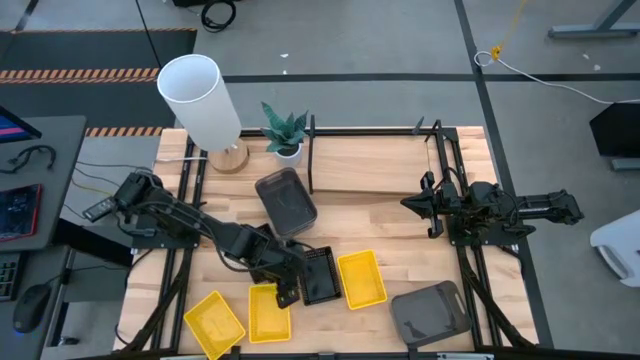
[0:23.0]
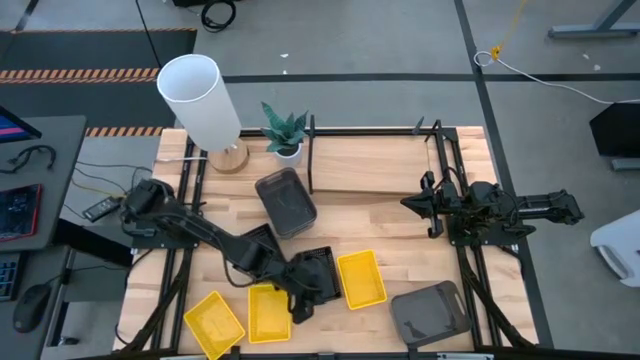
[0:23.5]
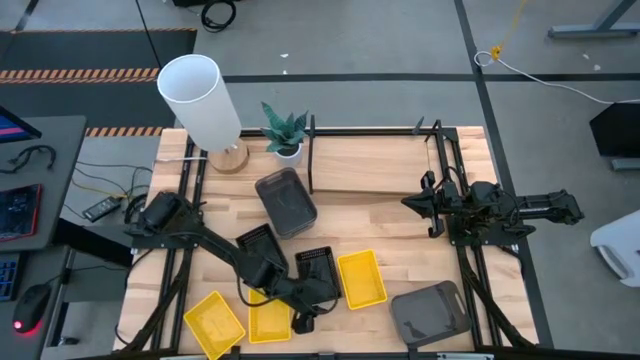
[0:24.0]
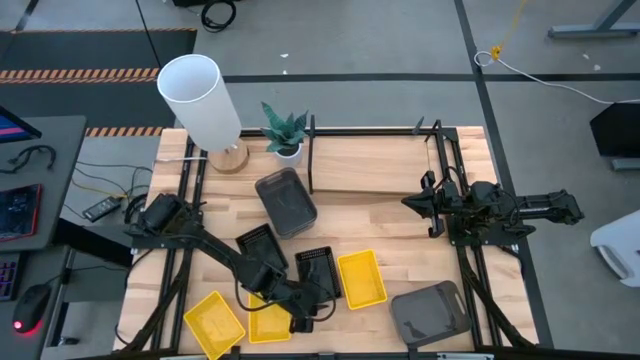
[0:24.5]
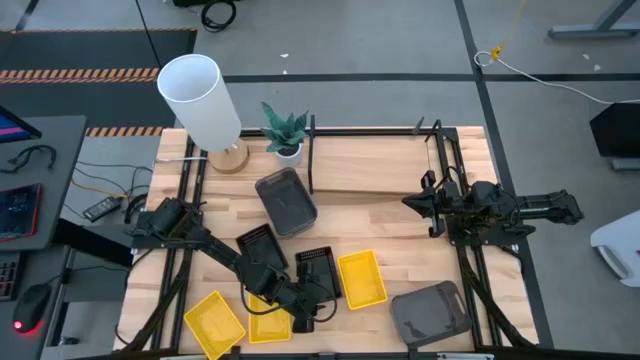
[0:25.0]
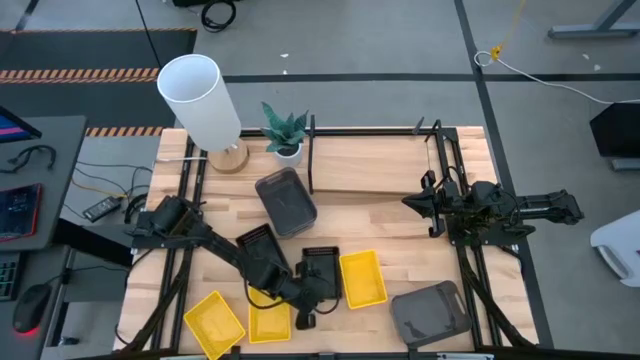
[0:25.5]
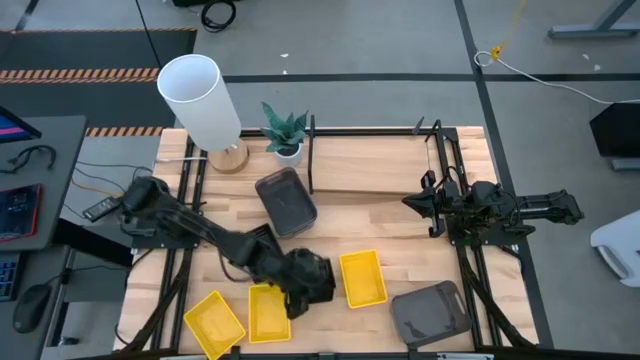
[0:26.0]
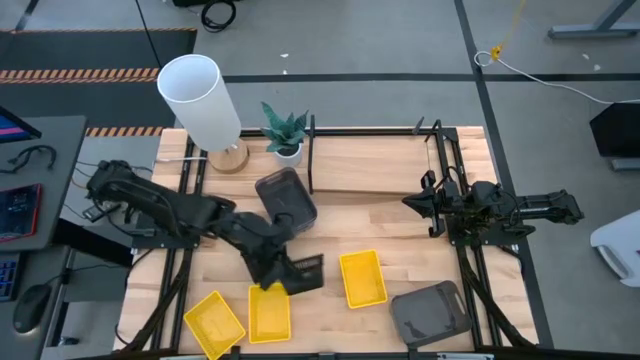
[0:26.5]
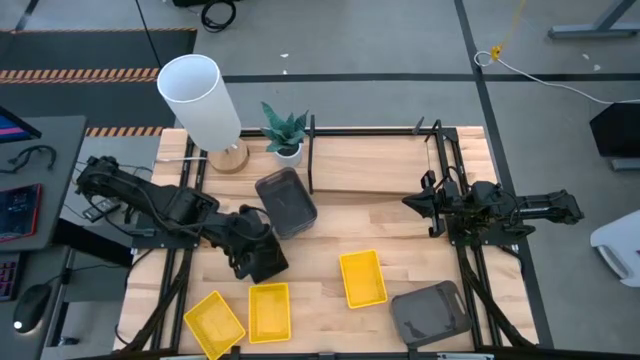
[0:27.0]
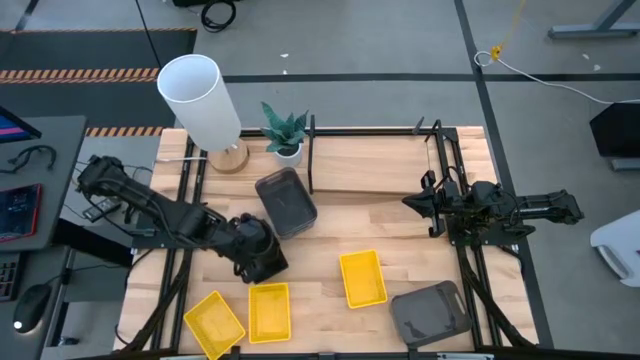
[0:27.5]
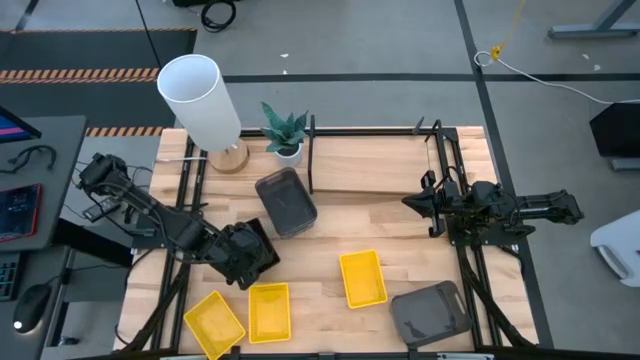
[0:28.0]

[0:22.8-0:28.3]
Task: Stack baskets on shelf by color
Stack the right black bin into the left black bin

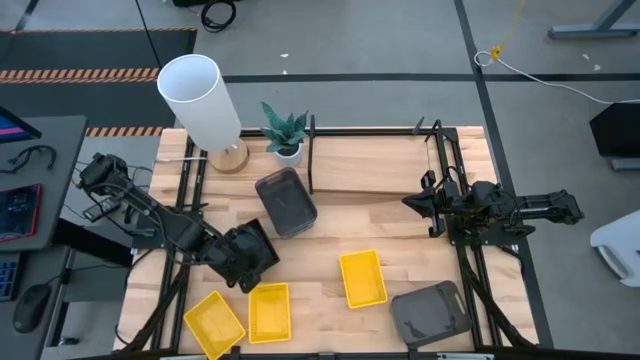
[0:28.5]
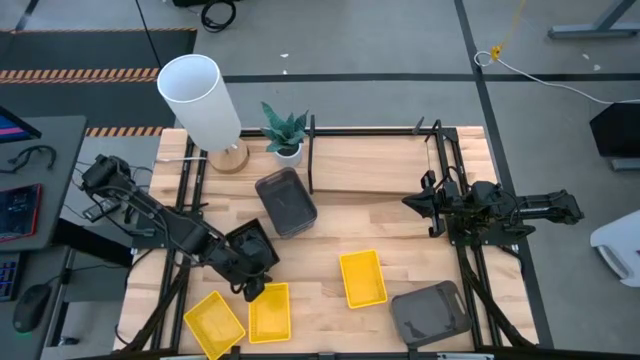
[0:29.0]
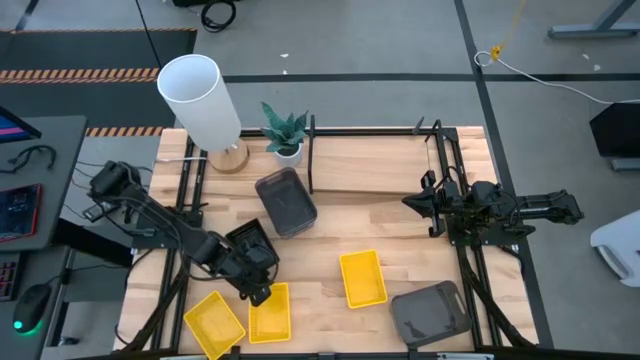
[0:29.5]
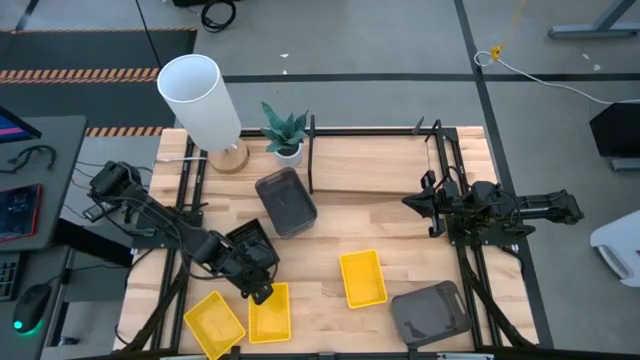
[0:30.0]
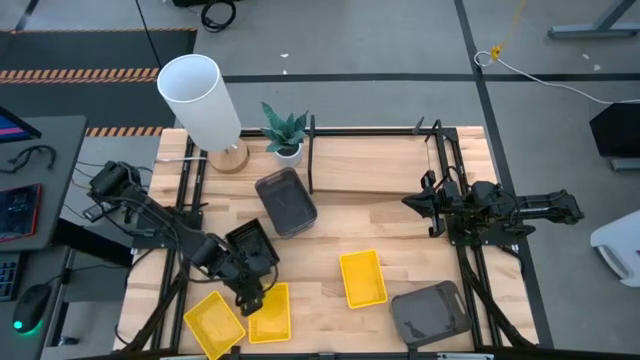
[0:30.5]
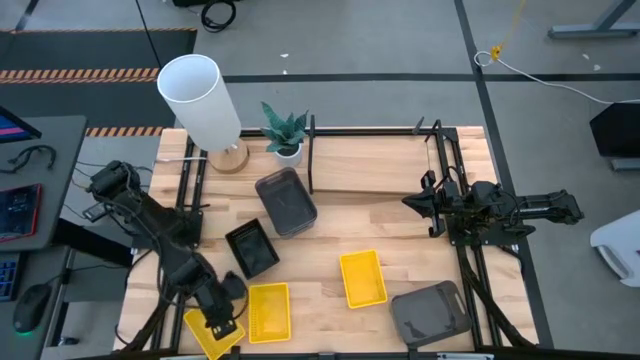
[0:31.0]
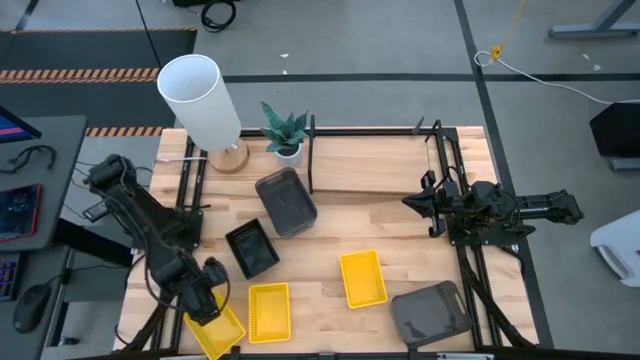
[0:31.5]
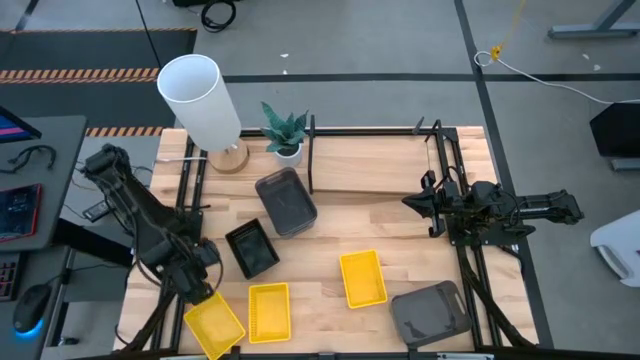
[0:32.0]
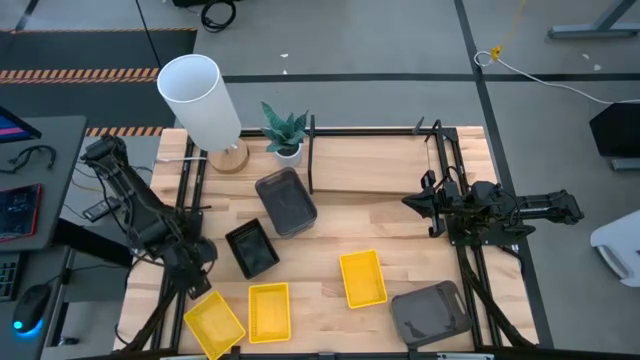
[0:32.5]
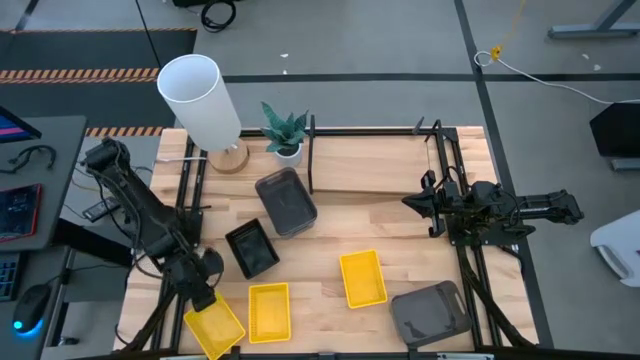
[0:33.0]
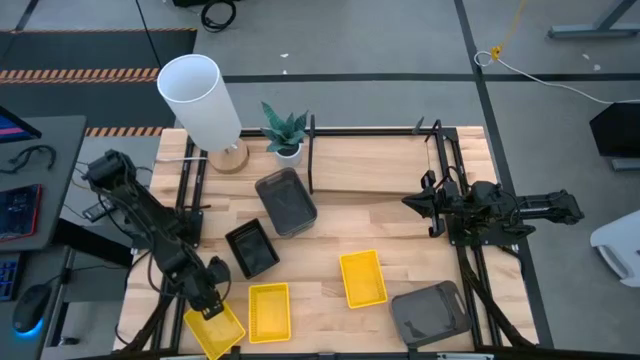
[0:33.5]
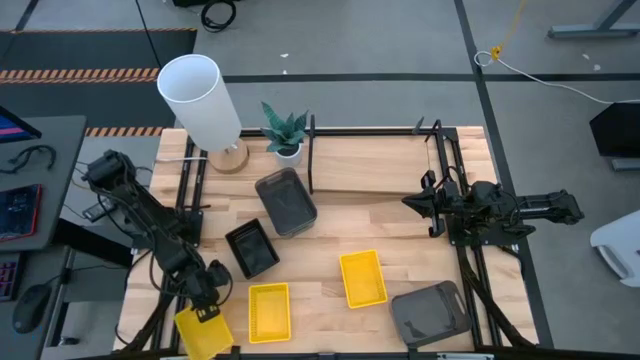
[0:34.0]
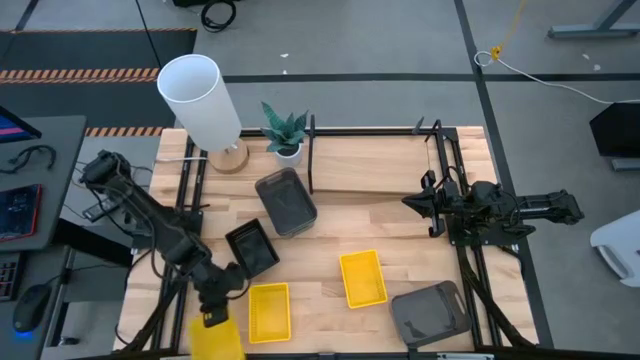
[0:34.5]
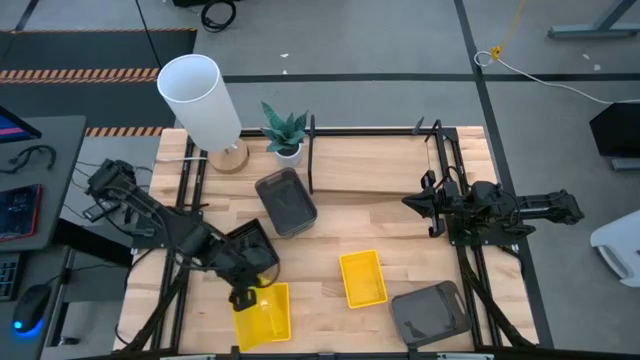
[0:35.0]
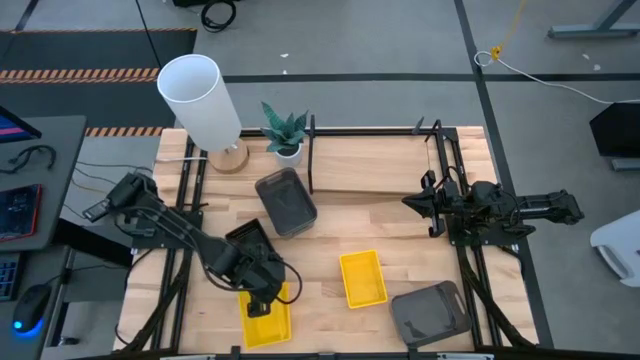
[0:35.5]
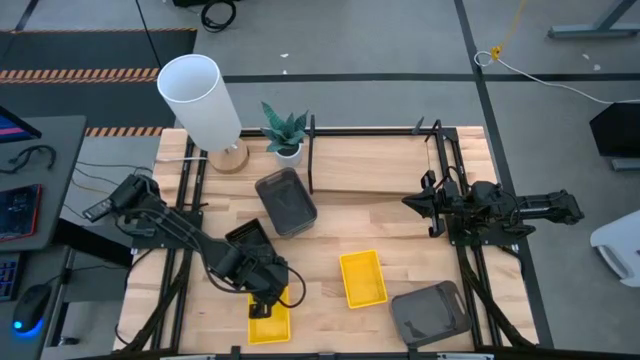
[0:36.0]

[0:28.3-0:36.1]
Stack the left yellow bin into the center yellow bin

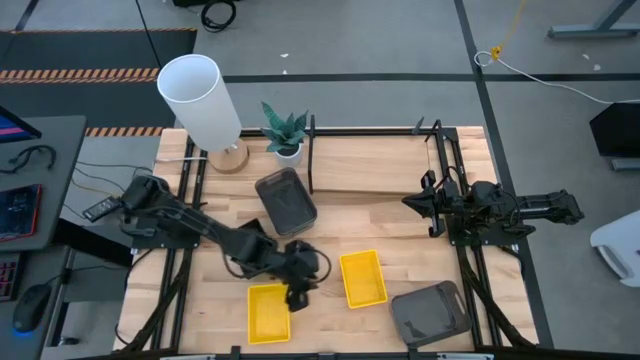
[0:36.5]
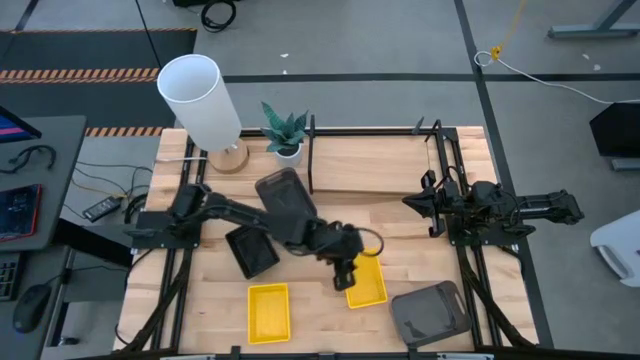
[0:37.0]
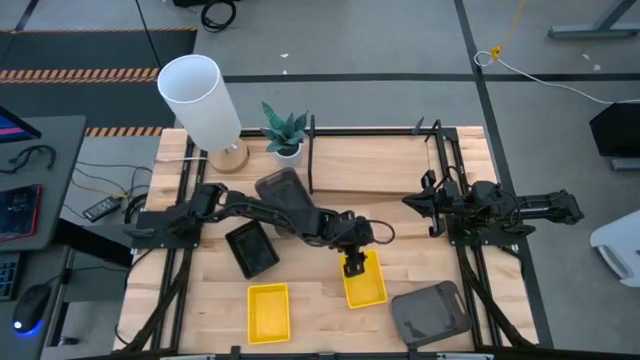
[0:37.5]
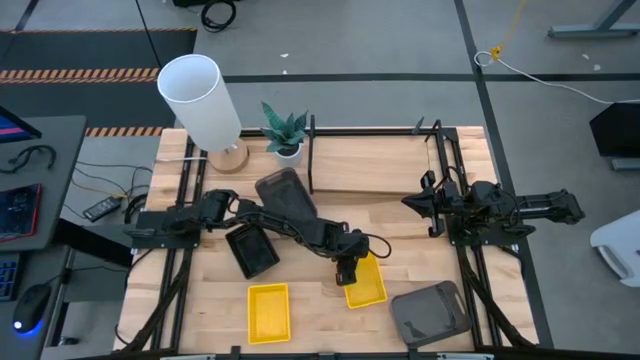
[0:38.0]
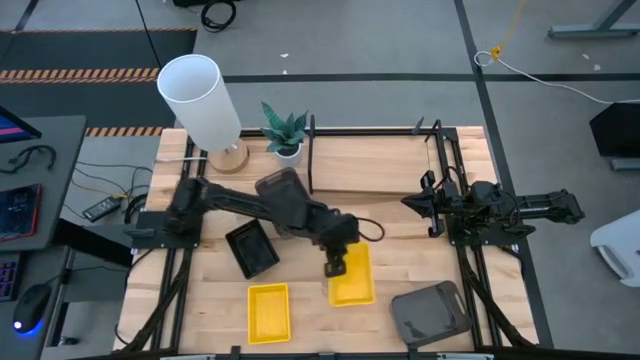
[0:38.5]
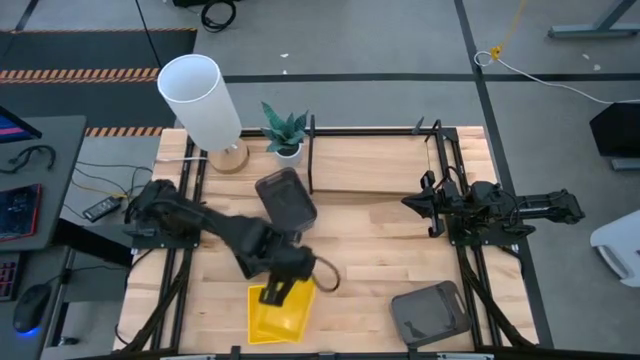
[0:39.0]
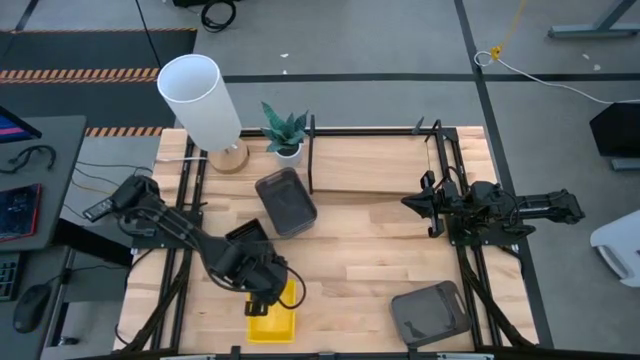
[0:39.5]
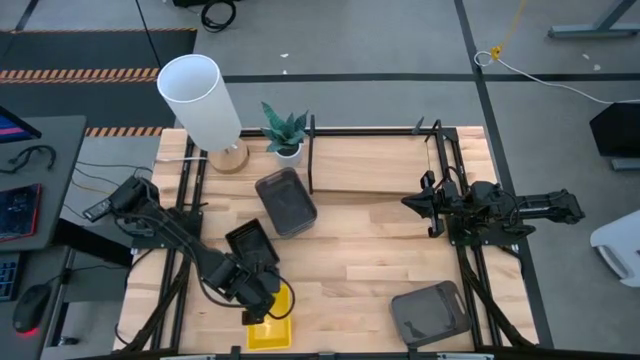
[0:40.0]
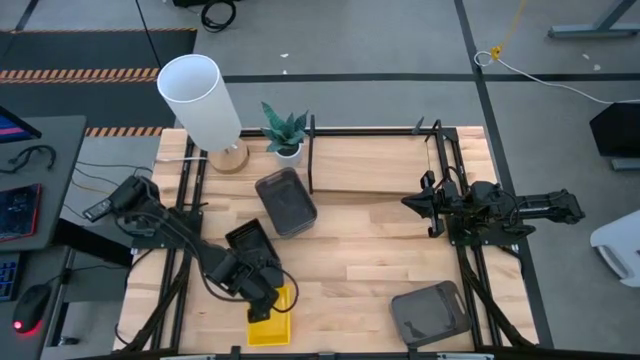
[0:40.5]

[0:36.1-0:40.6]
Stack the right yellow bin into the left yellow bin

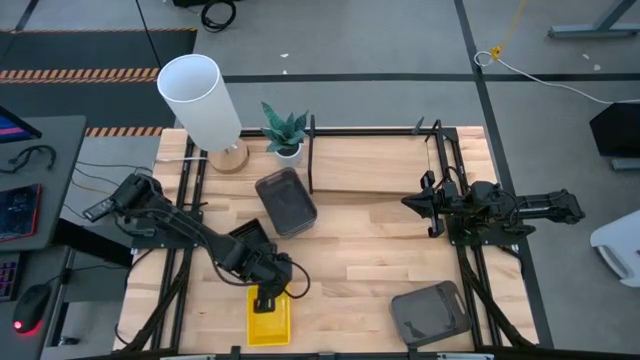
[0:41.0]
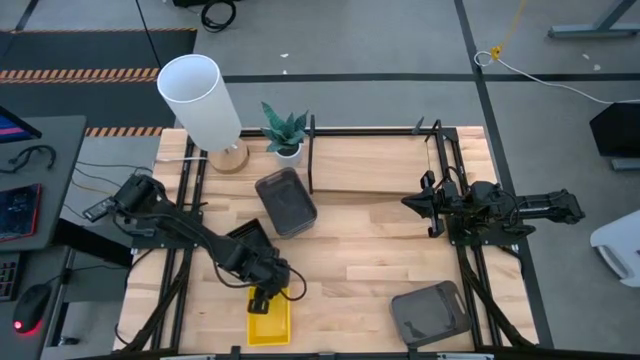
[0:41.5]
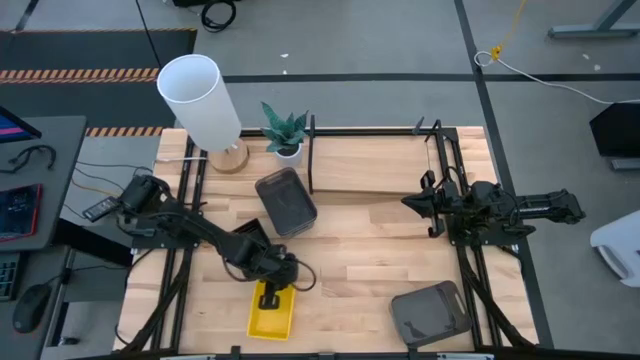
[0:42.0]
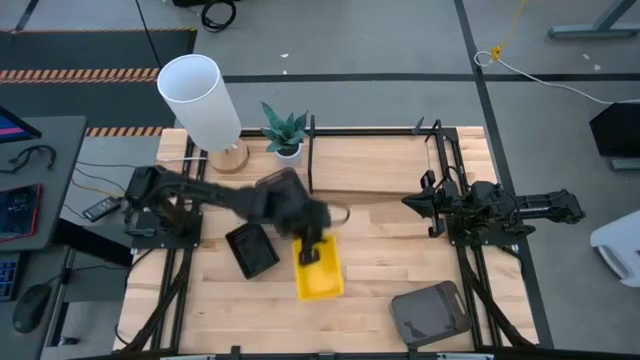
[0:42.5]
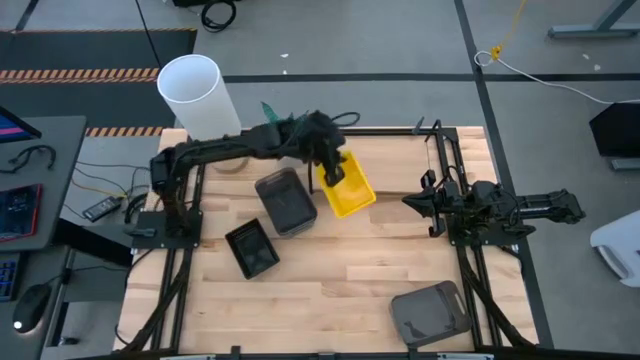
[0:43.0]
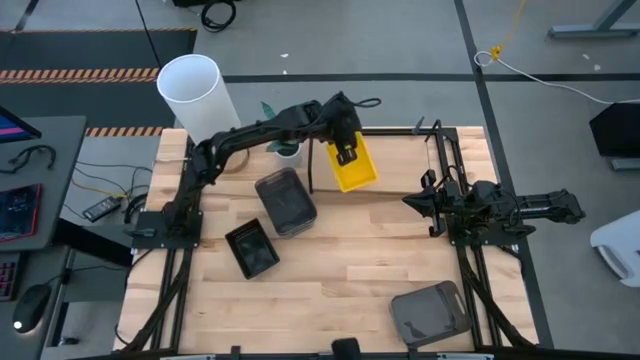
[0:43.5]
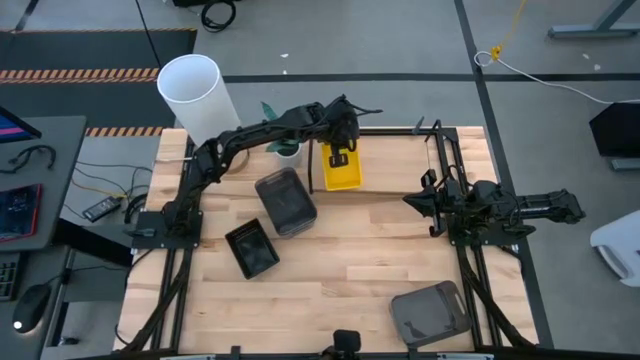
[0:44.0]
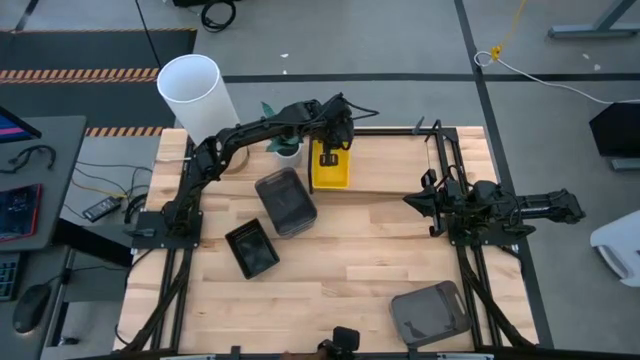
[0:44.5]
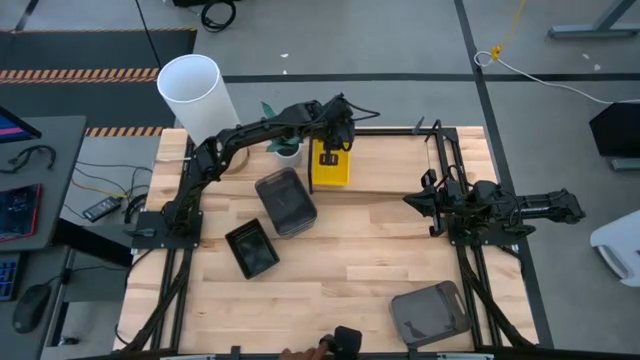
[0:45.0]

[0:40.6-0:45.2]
Put the stacked yellow bins on the shelf
